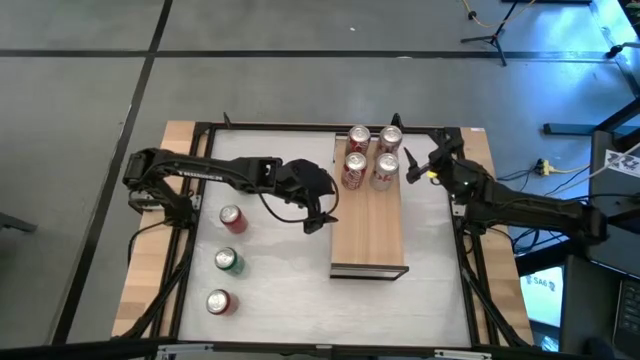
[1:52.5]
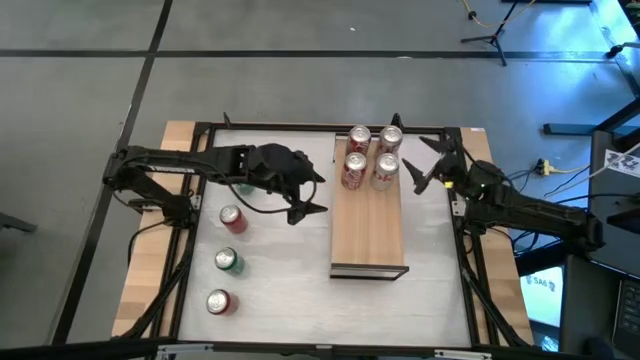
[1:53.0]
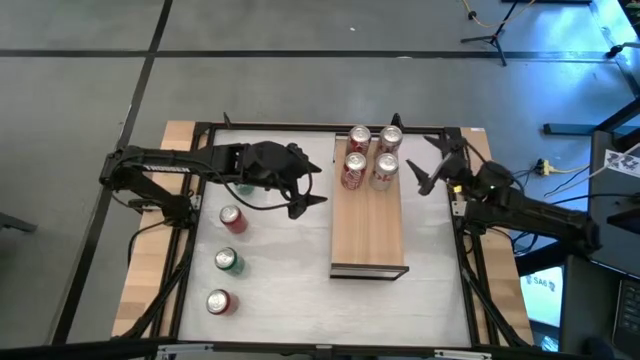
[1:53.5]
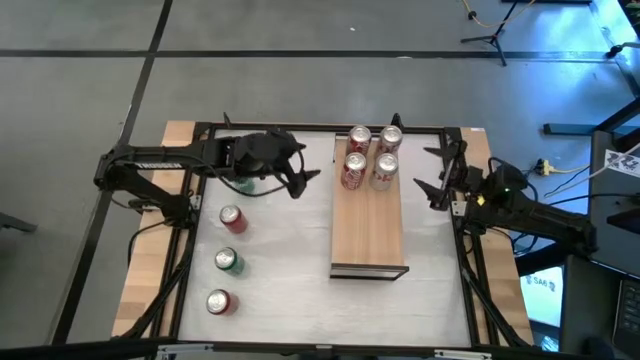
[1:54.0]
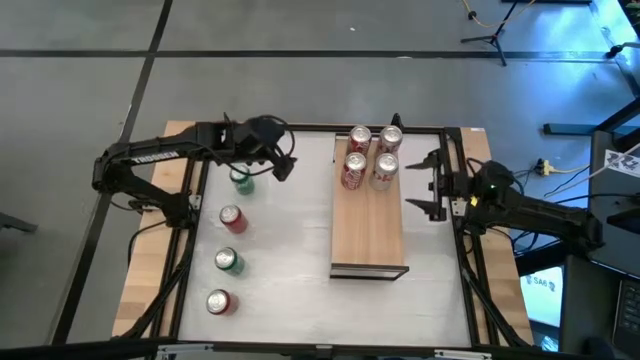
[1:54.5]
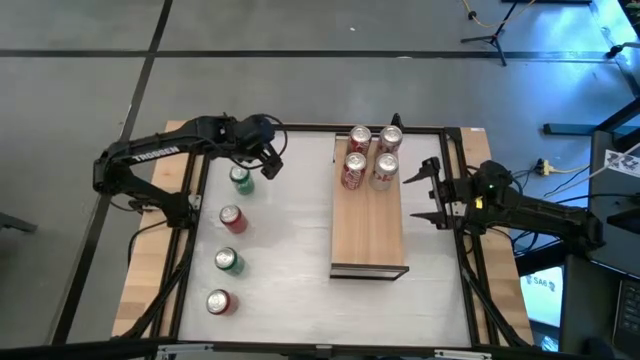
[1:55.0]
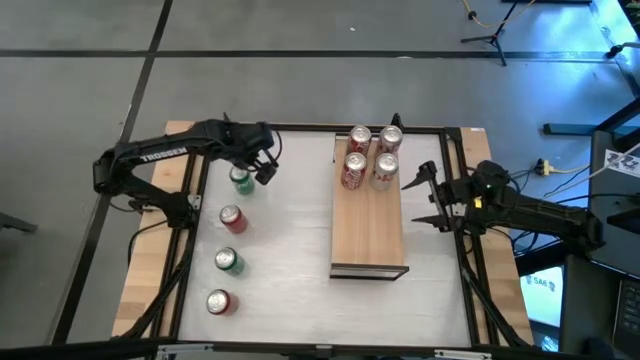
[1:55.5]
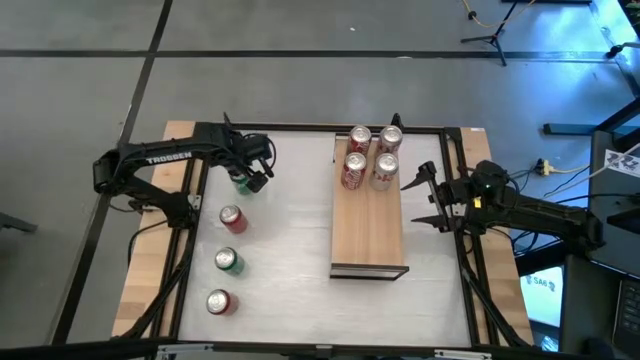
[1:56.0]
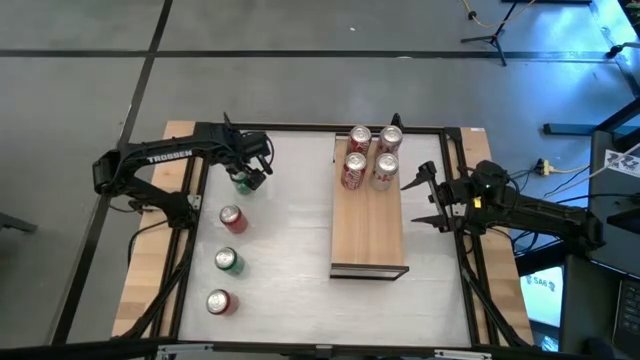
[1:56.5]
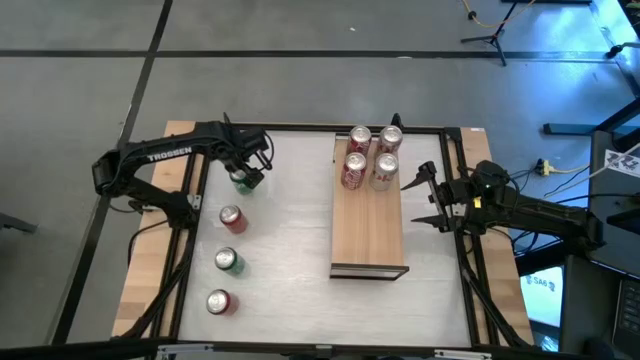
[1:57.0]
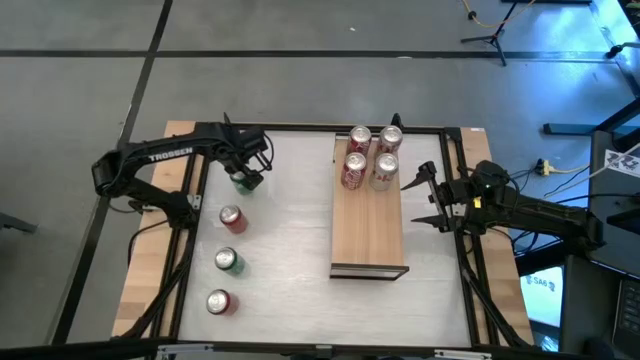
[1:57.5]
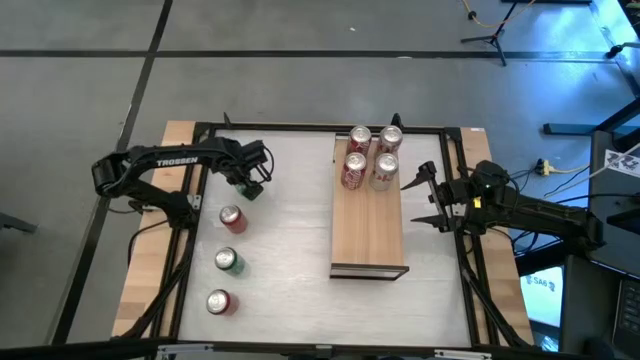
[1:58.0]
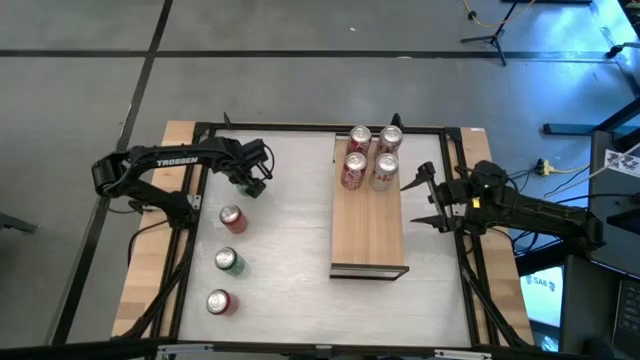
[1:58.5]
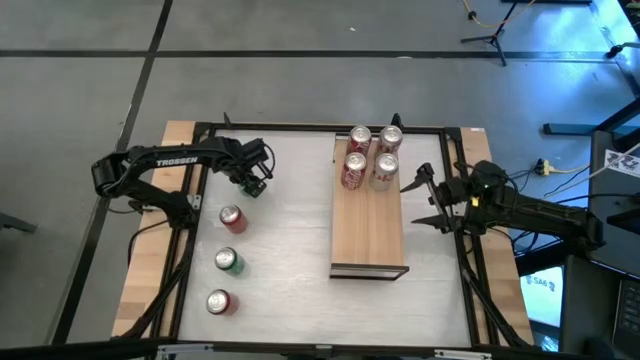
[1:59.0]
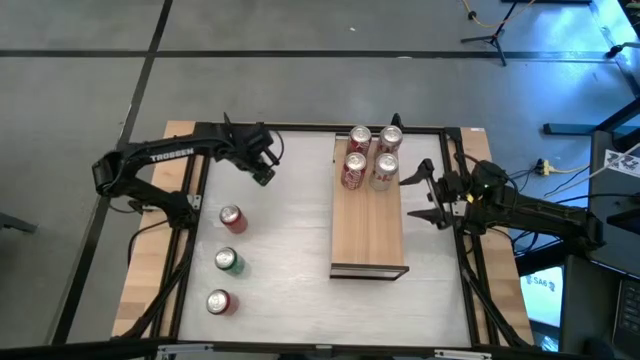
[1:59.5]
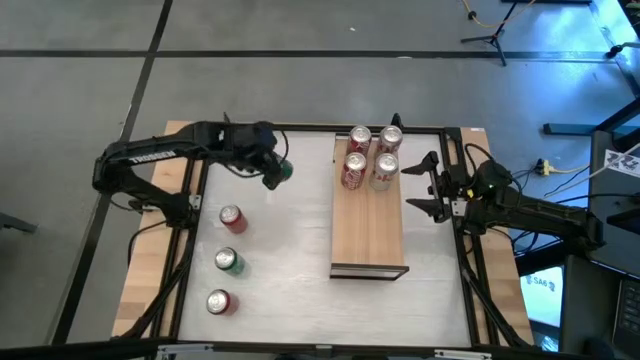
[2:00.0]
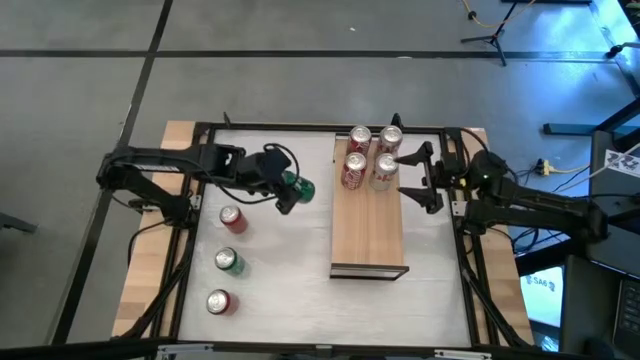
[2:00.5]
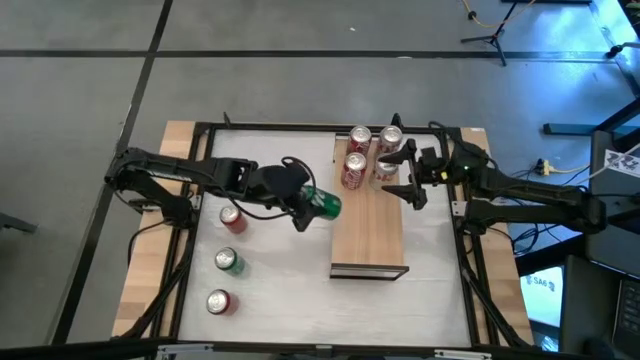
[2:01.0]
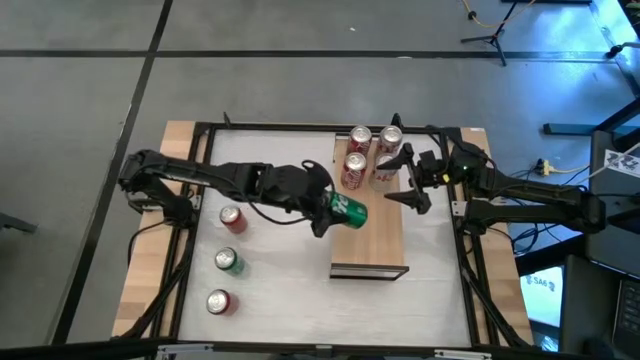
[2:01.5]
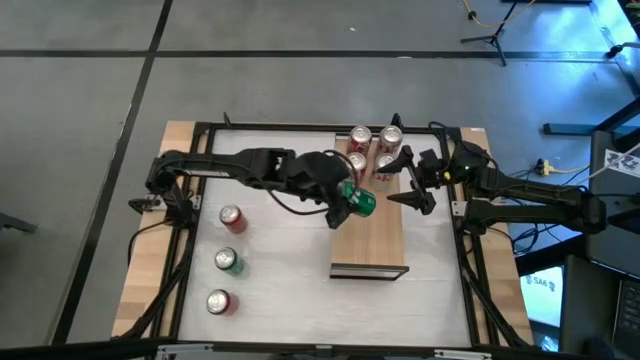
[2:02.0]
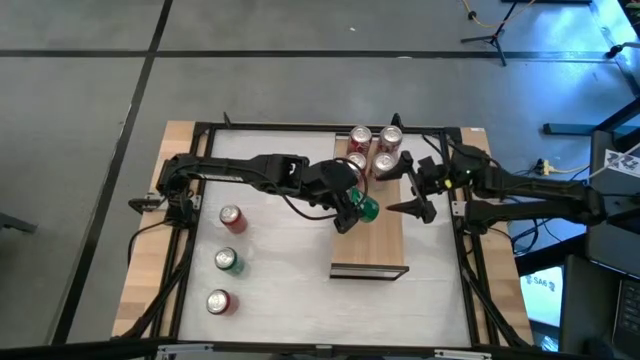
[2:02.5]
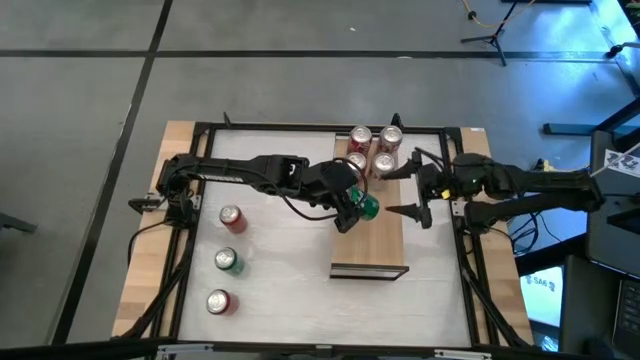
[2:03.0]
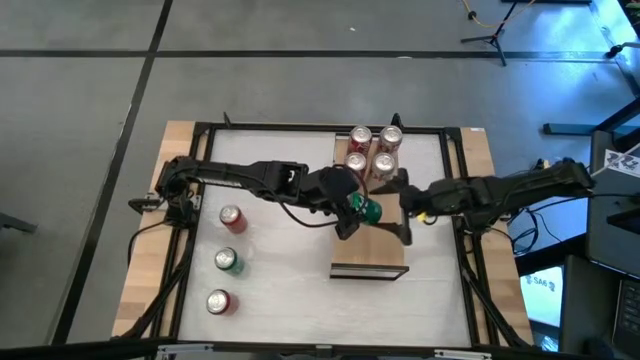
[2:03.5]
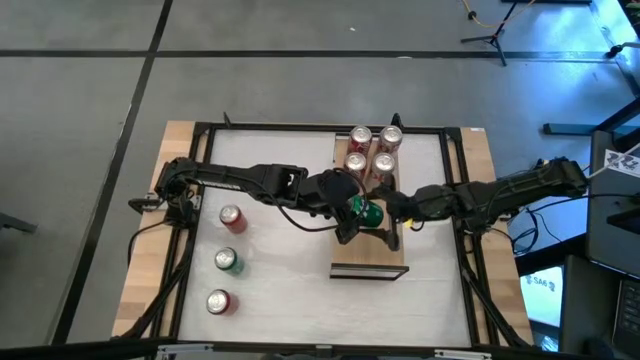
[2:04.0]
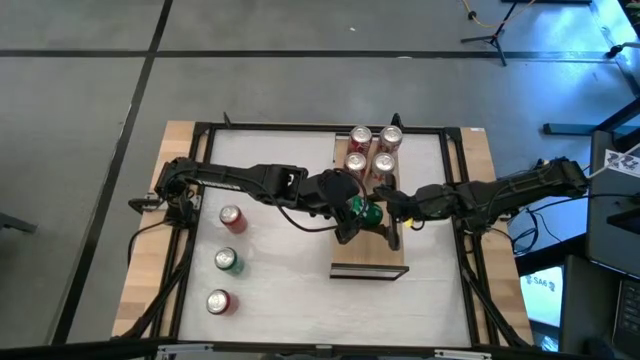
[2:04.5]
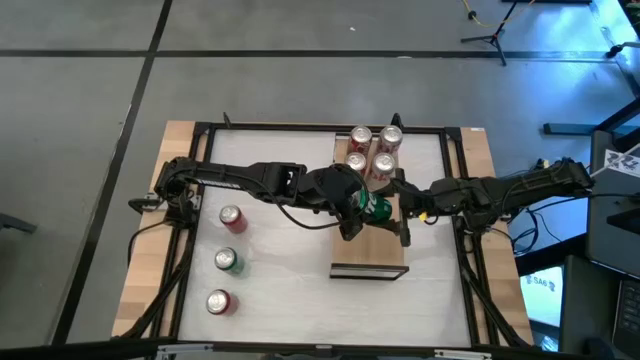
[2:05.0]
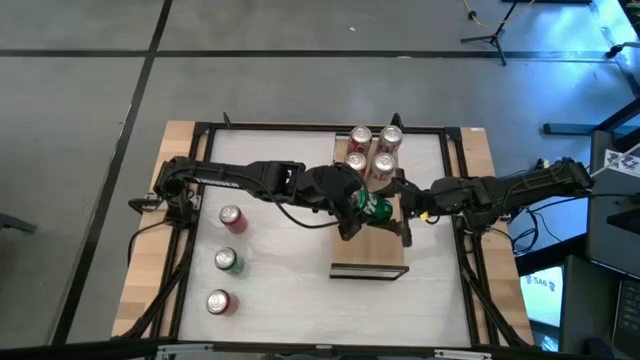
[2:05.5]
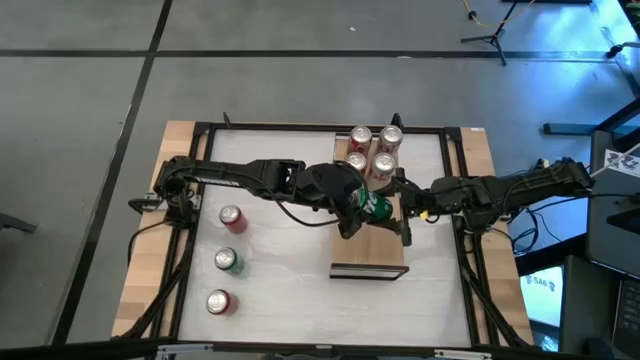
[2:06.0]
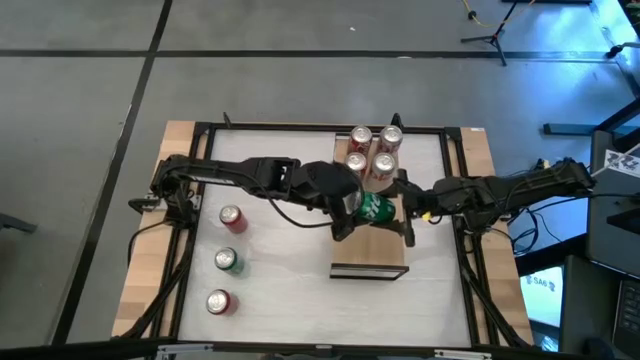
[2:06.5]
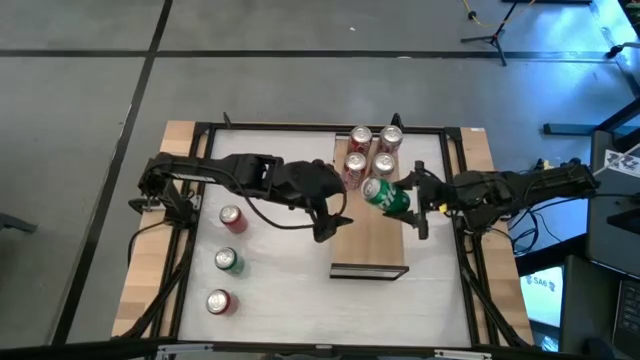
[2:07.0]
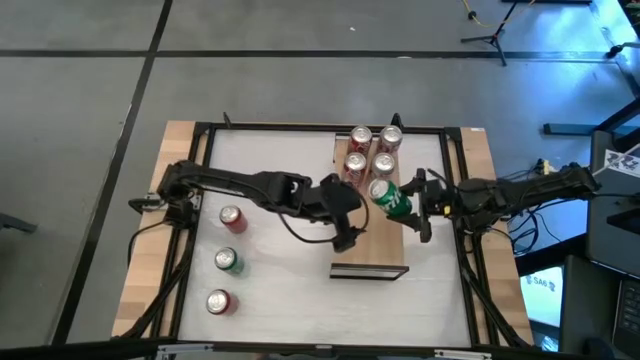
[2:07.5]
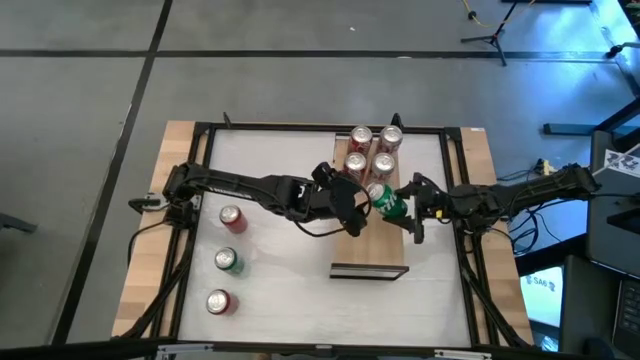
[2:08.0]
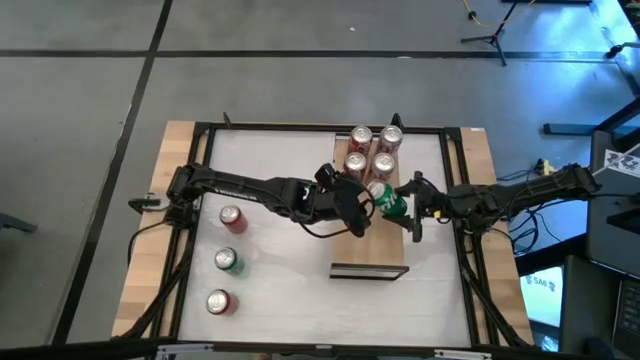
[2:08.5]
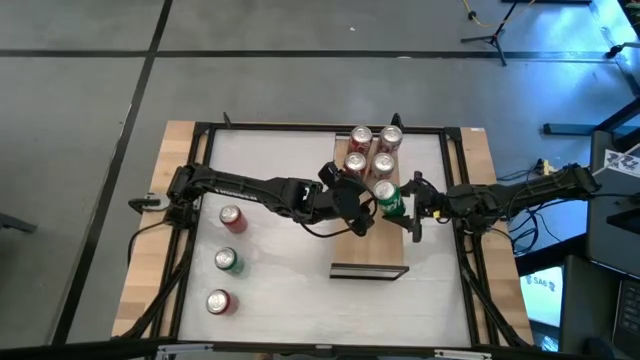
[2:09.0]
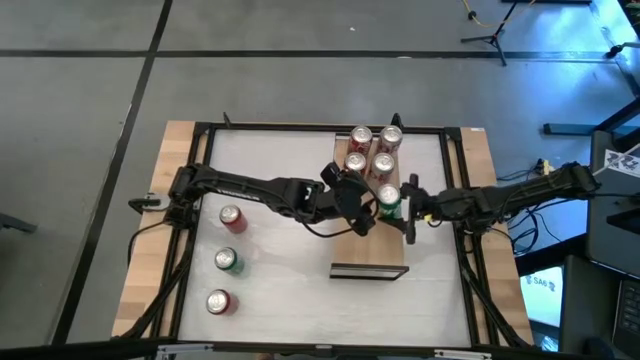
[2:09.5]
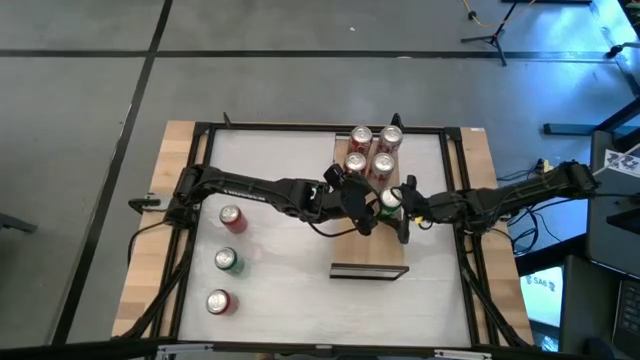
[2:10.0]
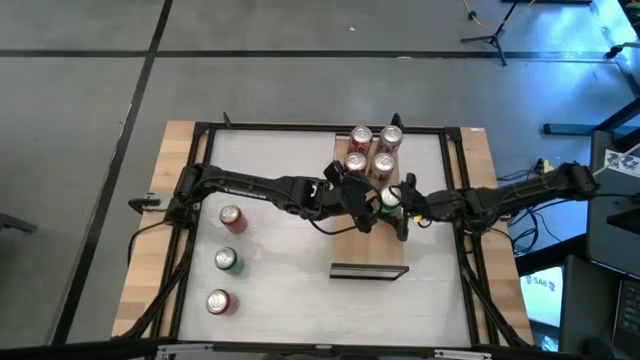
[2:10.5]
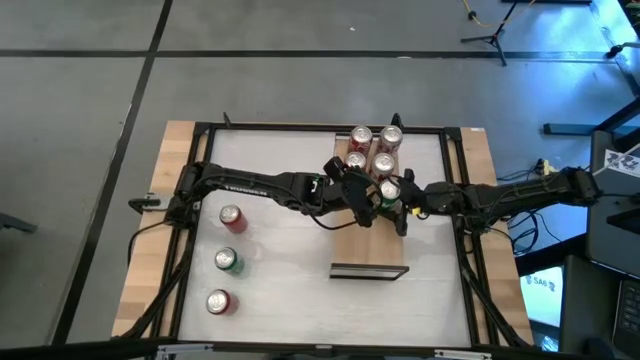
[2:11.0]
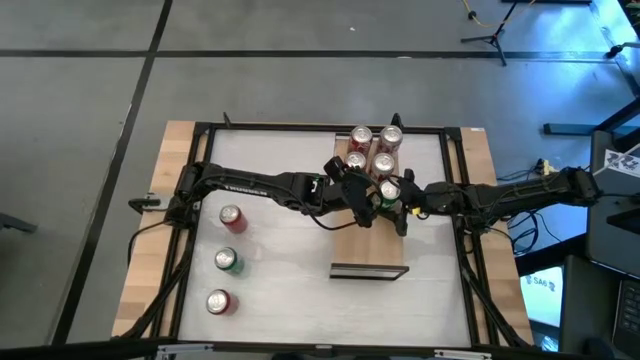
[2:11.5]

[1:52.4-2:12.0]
Task: Place canned beverage on shelf
Put the top green soda can on the shelf

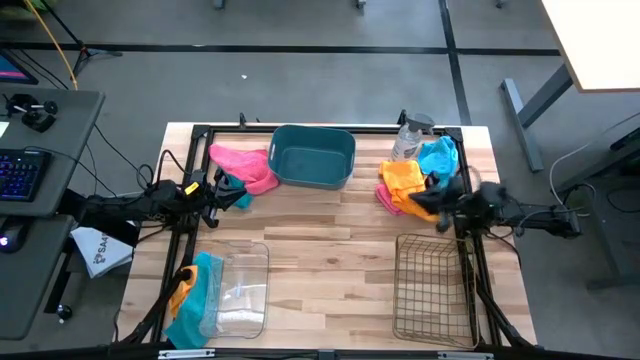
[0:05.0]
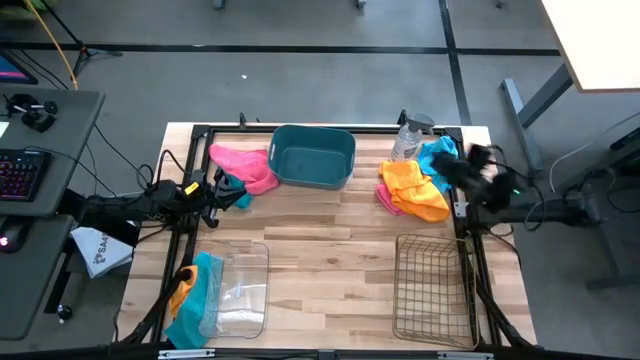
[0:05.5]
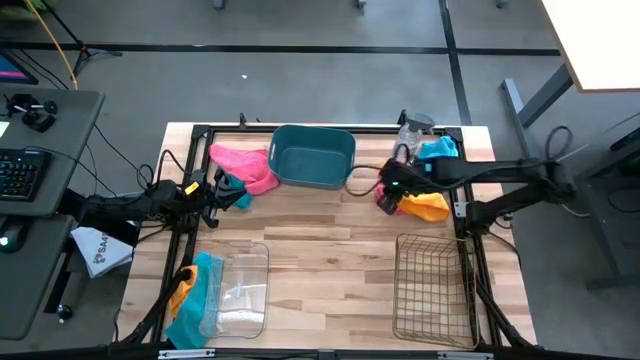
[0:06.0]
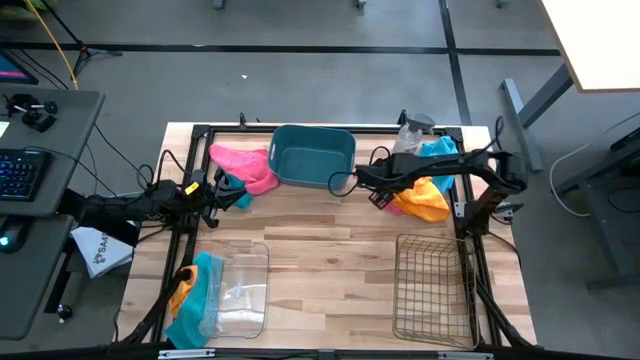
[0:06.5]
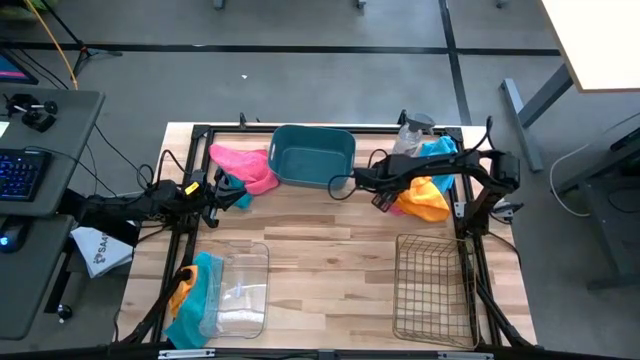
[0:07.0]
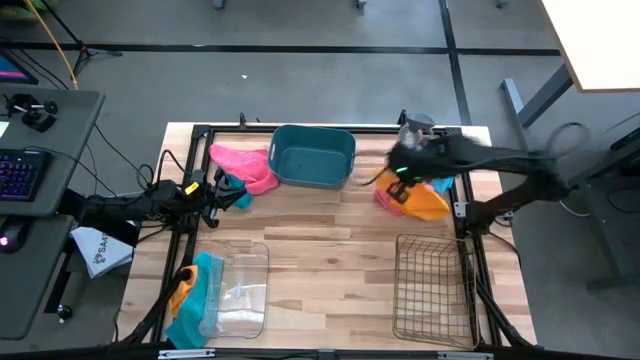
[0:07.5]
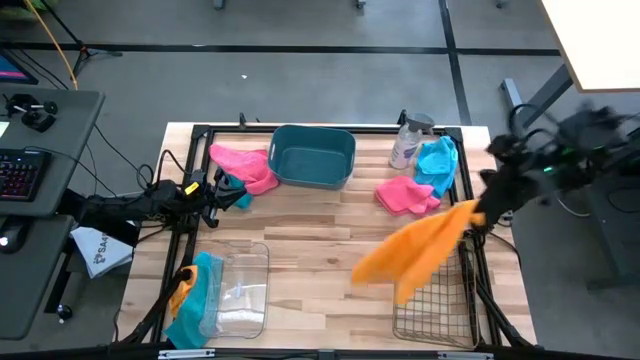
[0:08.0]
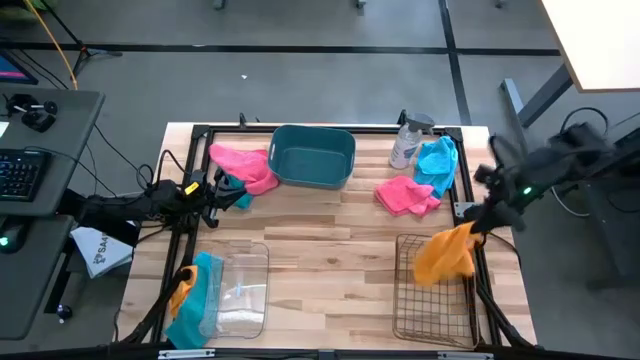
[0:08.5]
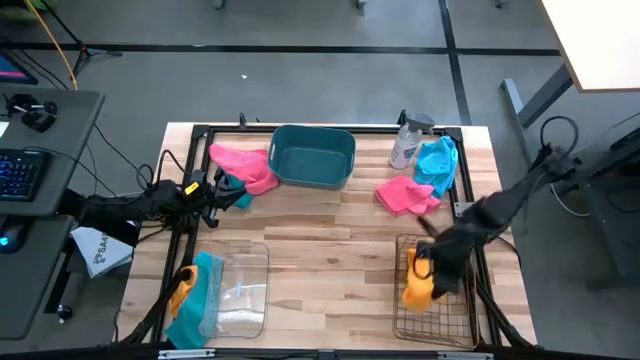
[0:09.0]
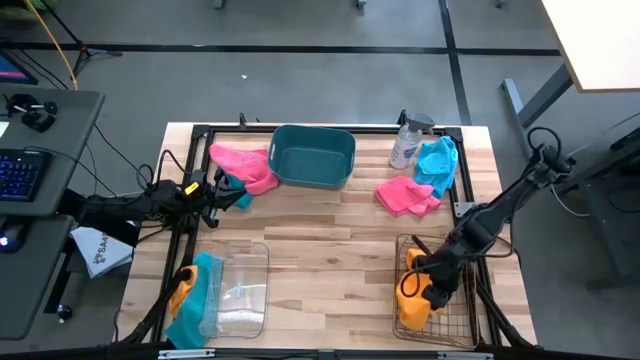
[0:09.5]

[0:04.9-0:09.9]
Task: Sort microfiber towel by color & place in baskets
Put the top orange microfiber towel into the wire basket
